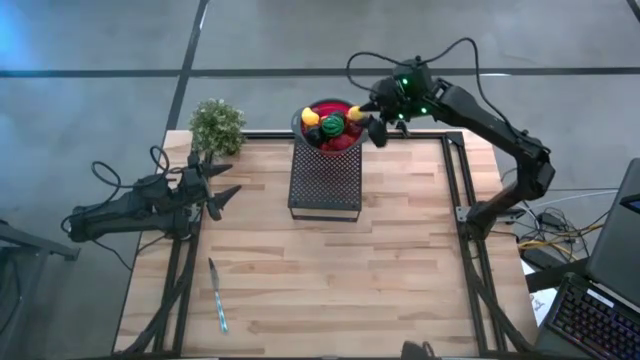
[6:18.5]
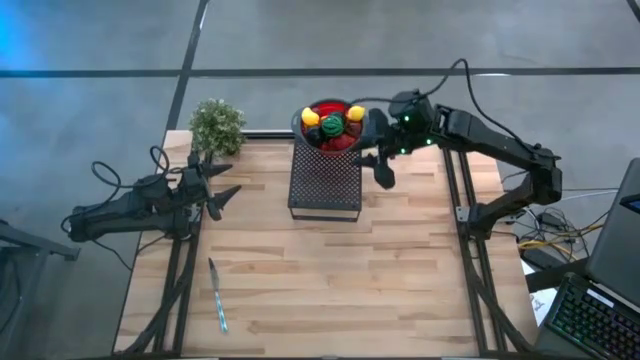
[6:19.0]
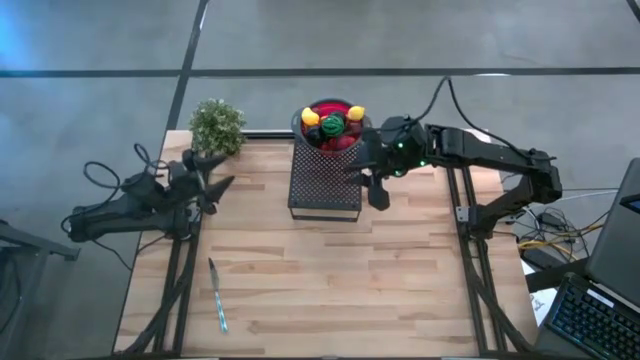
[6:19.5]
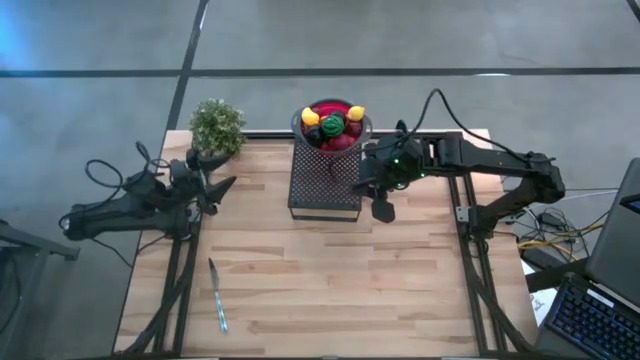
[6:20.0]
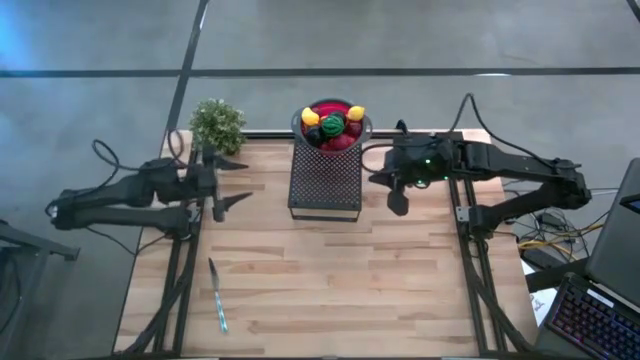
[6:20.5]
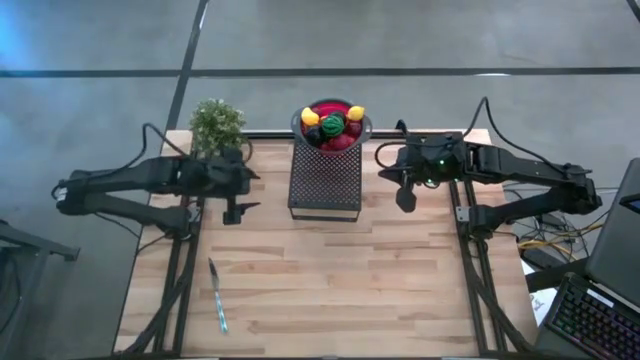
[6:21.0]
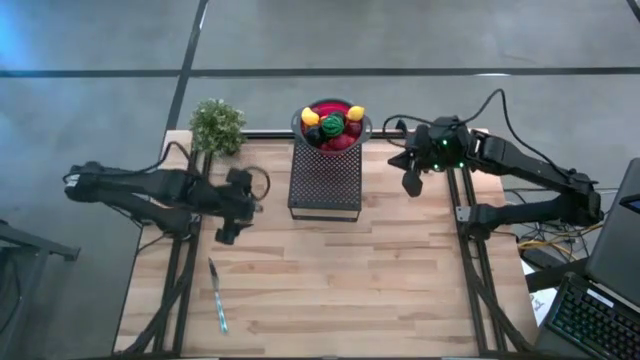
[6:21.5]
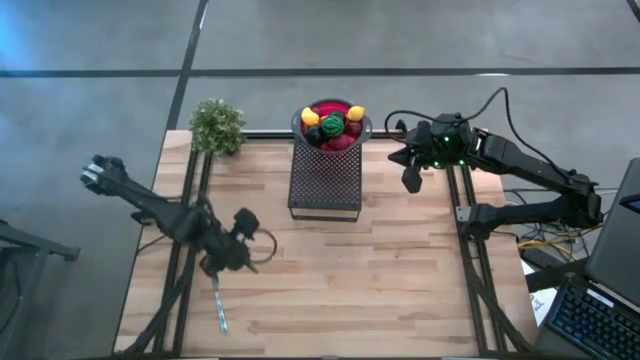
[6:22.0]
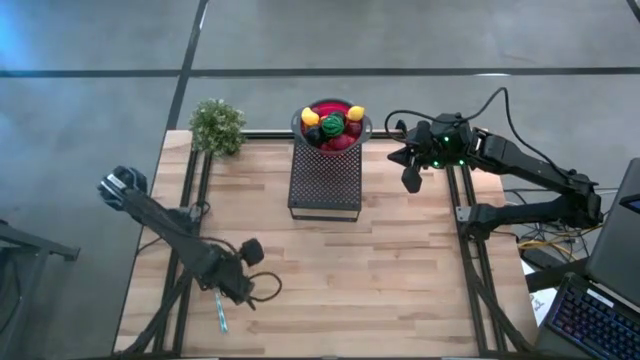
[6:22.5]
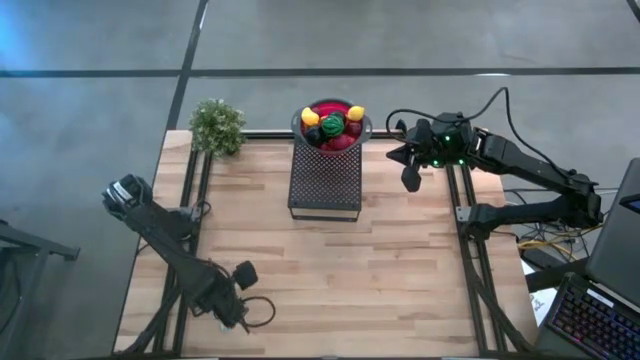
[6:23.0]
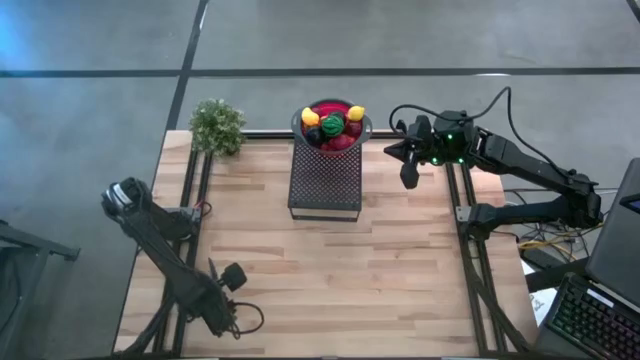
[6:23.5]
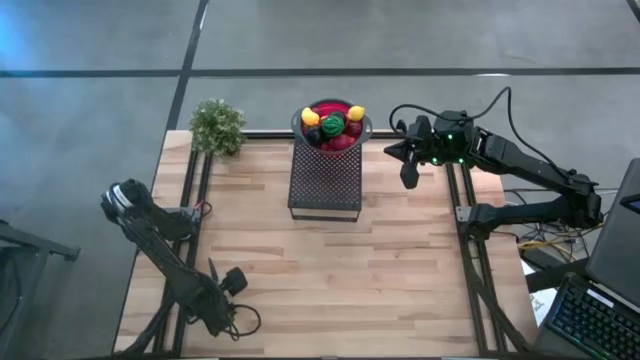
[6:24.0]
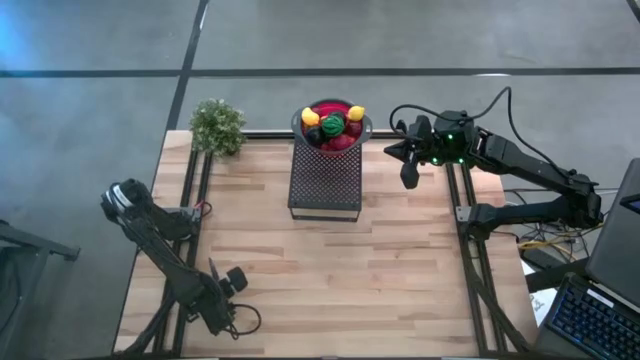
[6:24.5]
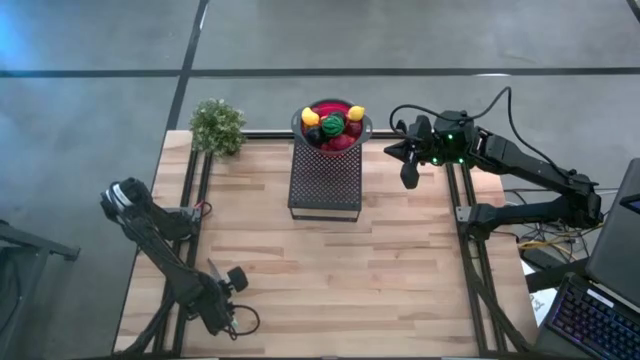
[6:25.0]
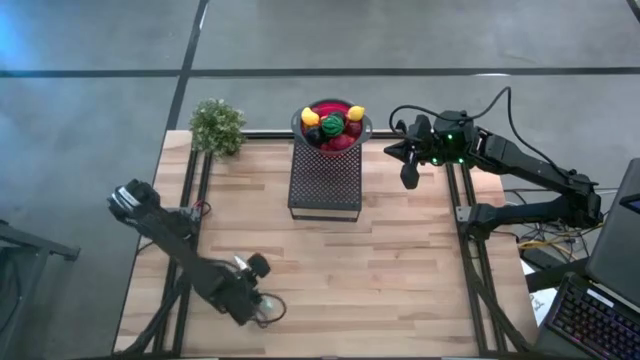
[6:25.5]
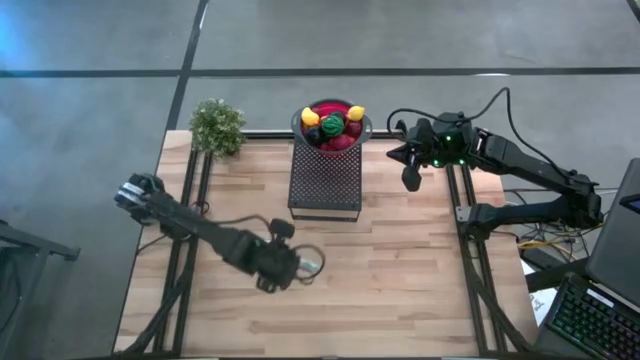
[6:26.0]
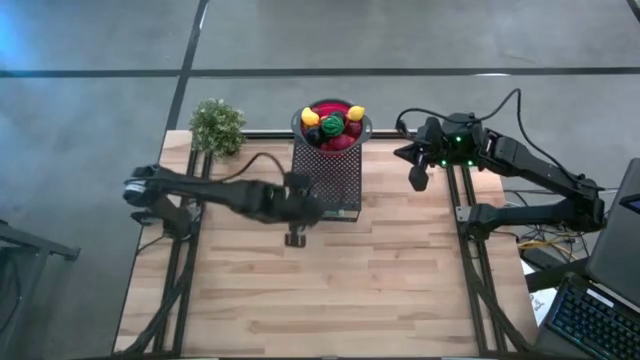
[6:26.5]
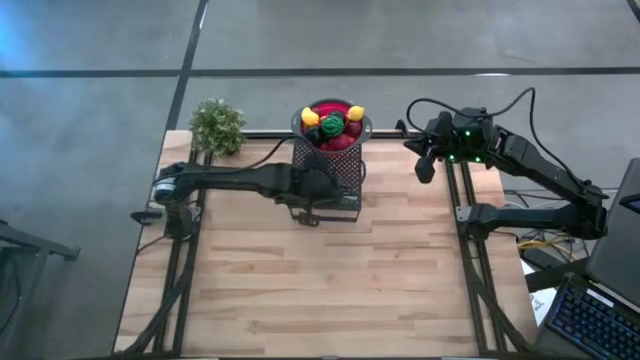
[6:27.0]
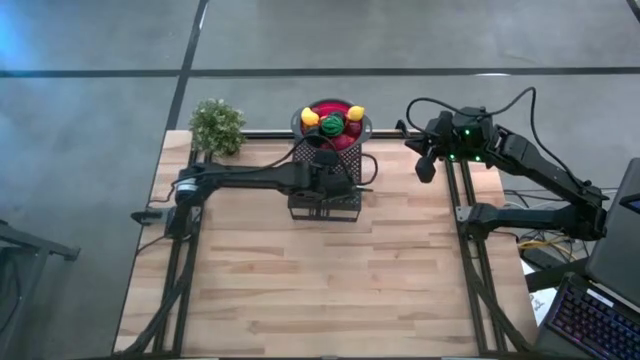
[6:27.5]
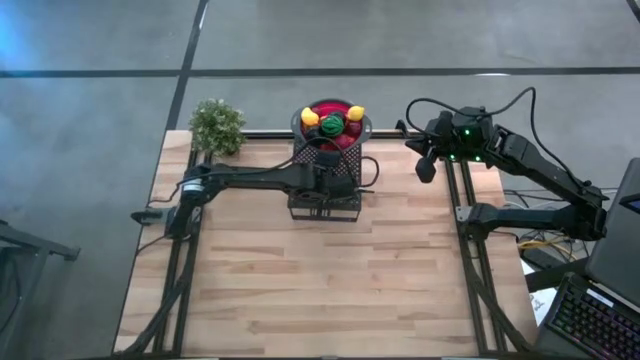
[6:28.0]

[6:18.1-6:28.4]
Task: Pick & Place Fruit
Put the kitchen knife on the shelf

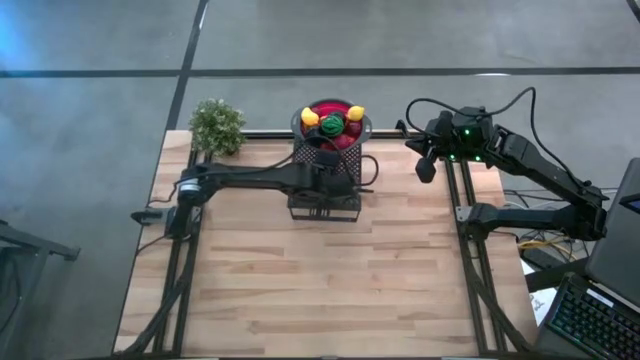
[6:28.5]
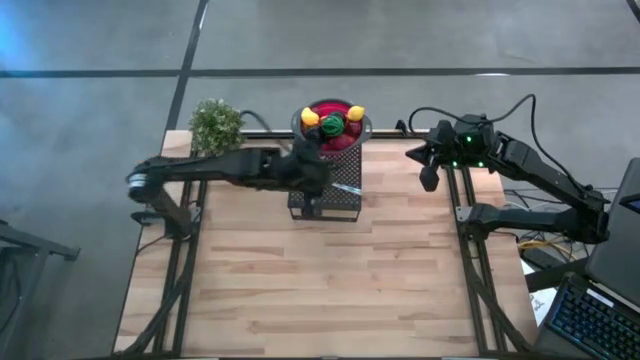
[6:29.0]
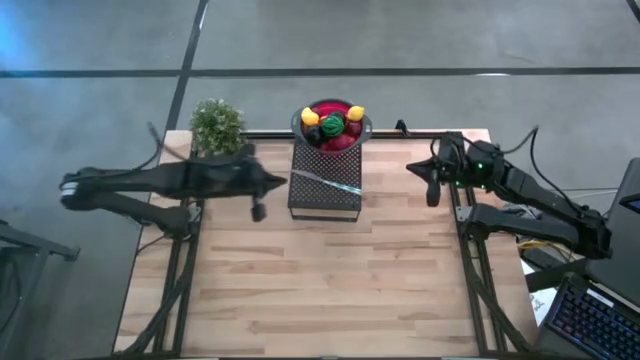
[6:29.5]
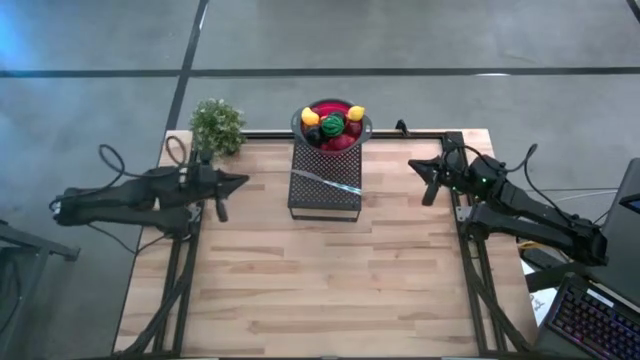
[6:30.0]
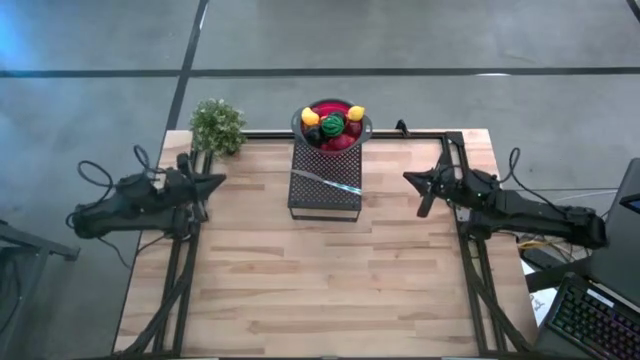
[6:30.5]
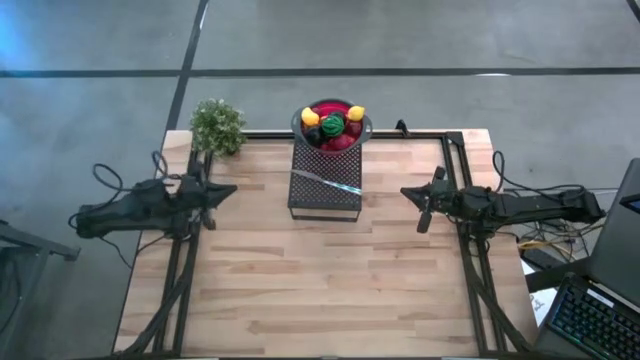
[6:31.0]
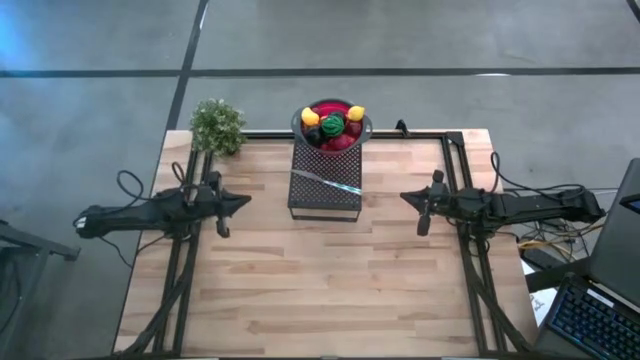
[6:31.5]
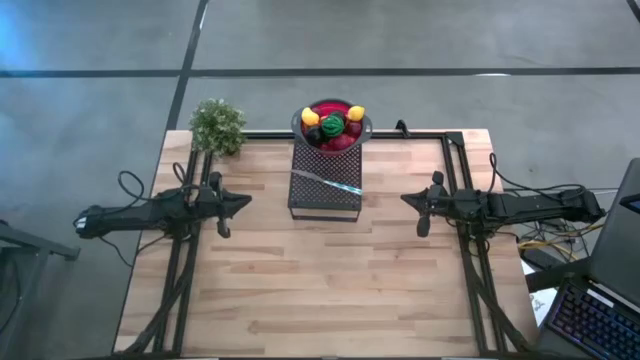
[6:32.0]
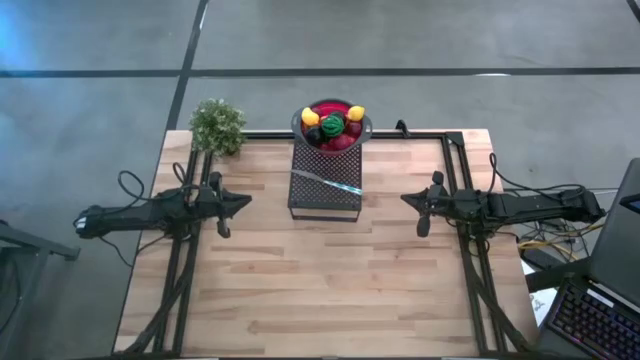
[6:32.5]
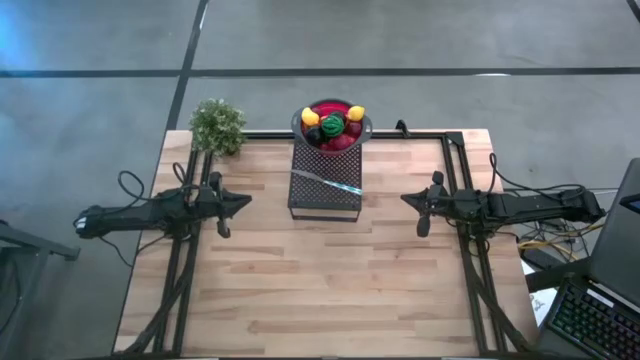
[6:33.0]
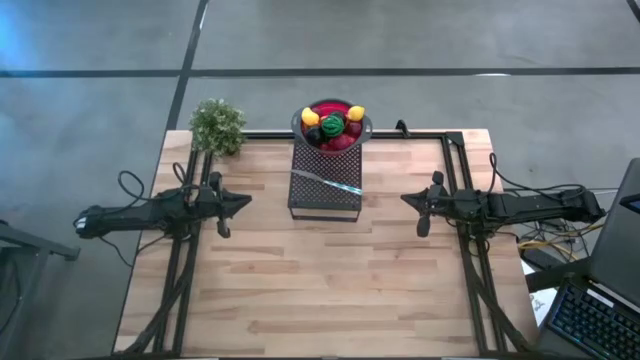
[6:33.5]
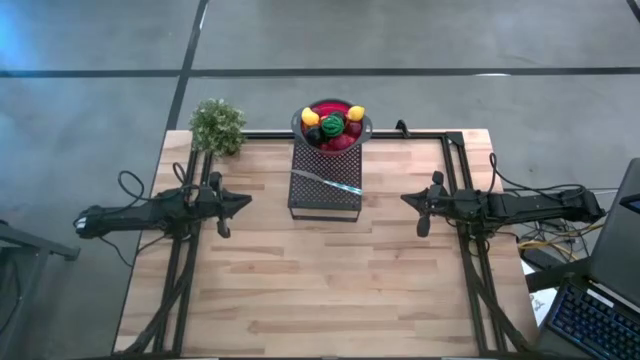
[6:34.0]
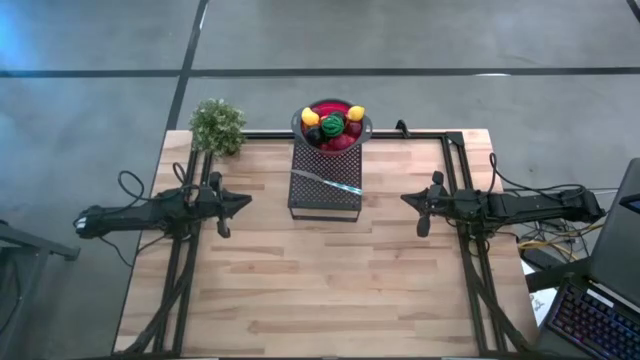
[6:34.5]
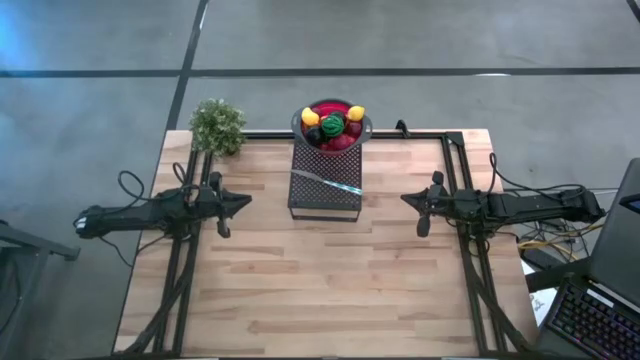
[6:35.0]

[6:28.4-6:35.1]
Return to Home Position

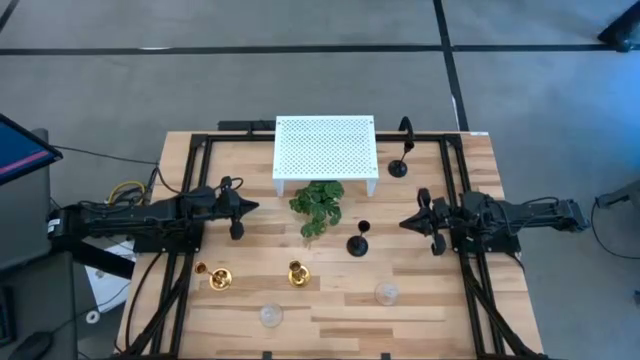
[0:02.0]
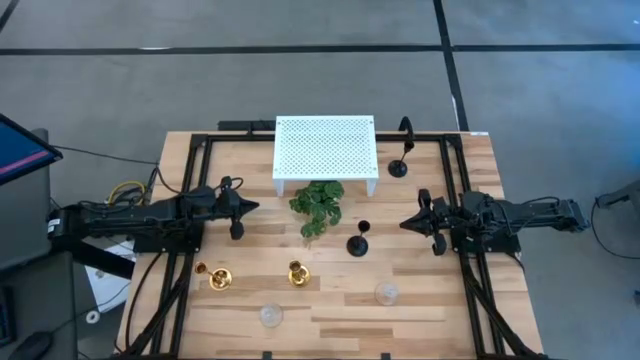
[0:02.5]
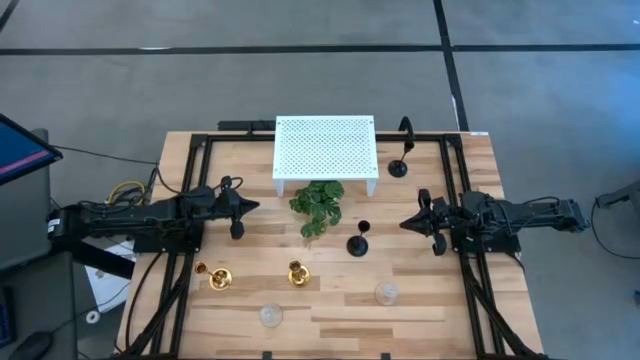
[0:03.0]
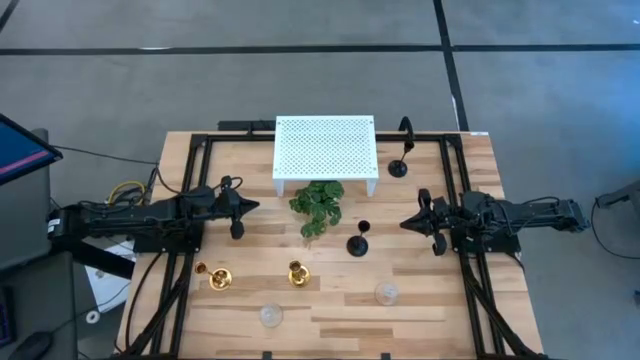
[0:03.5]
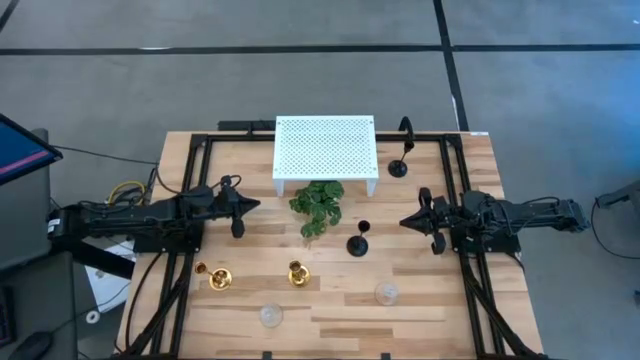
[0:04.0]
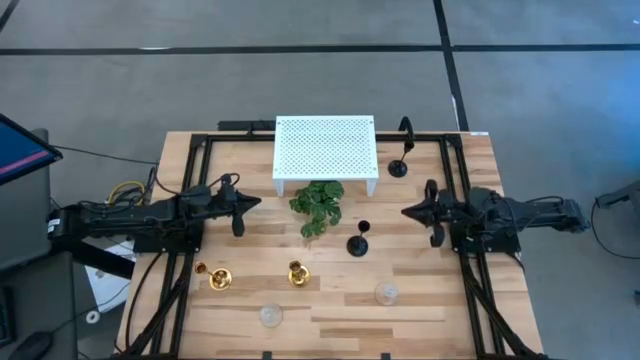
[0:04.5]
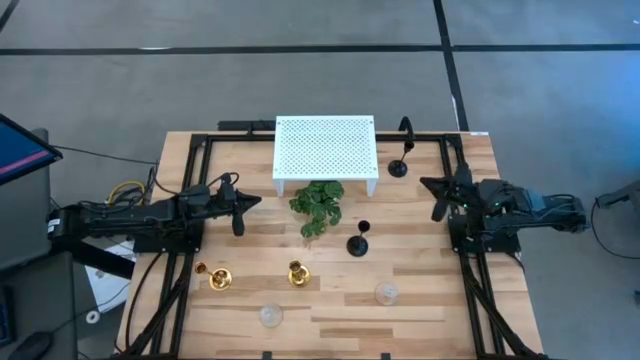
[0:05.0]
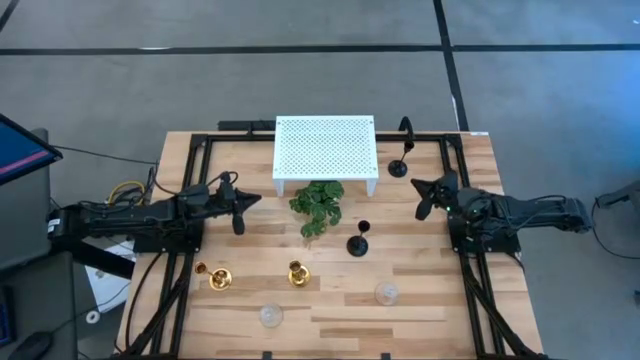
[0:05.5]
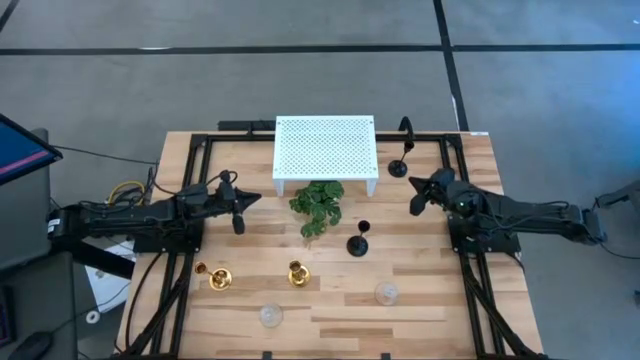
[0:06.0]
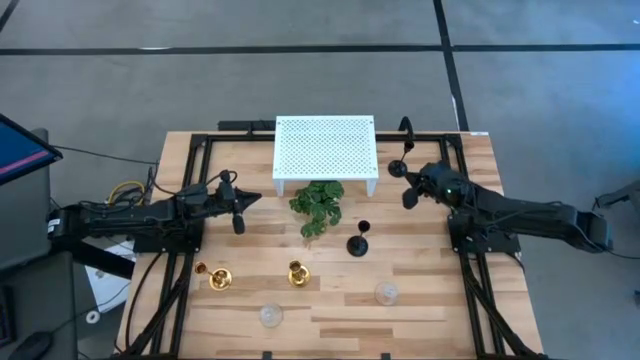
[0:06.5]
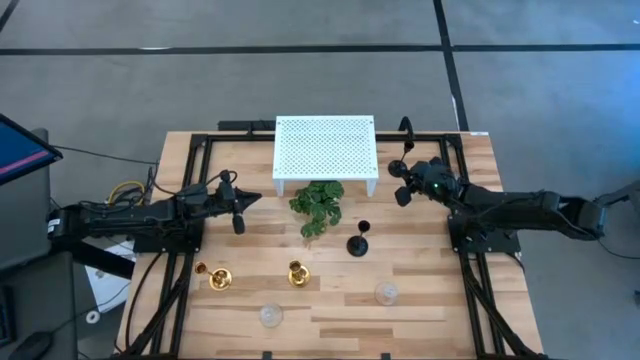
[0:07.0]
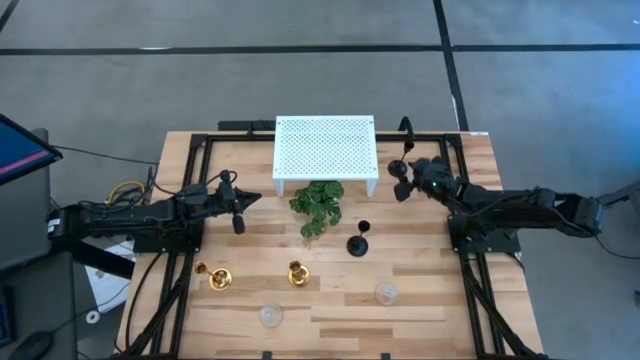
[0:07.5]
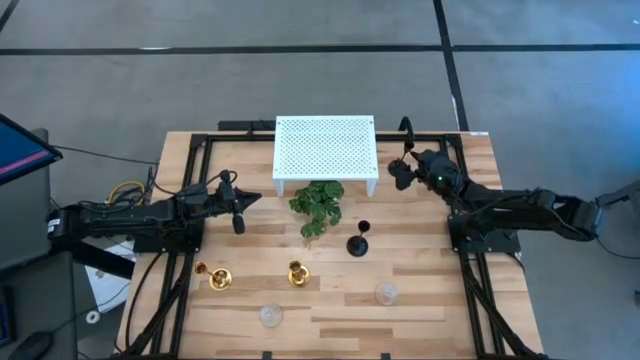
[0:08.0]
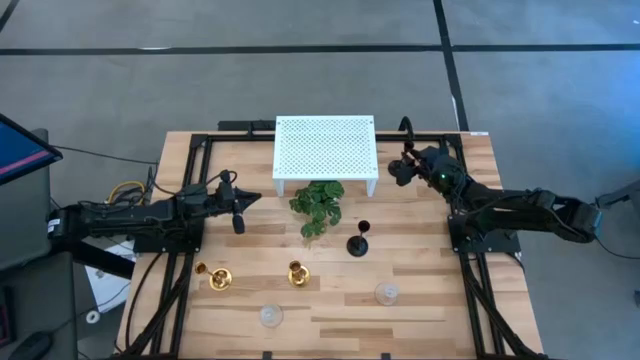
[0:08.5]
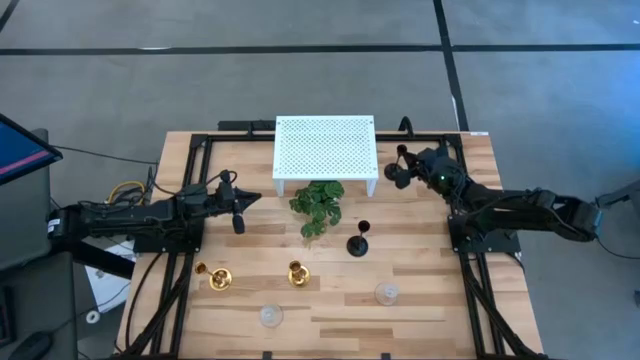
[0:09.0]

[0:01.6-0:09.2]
Task: Pick & Place candle stick holders
Put the top black candle holder on the shelf
